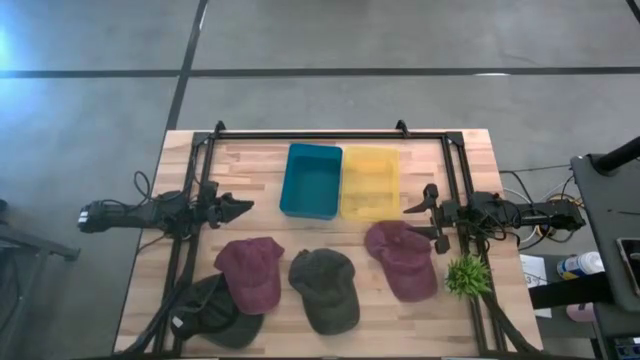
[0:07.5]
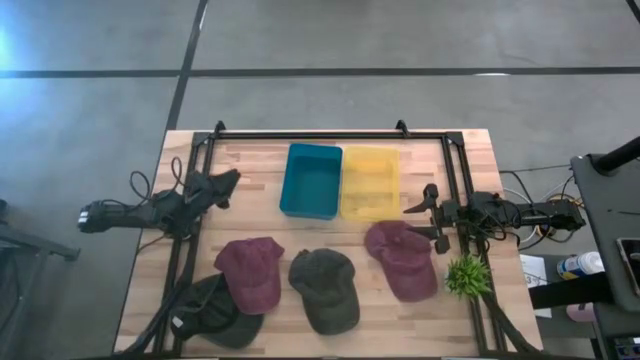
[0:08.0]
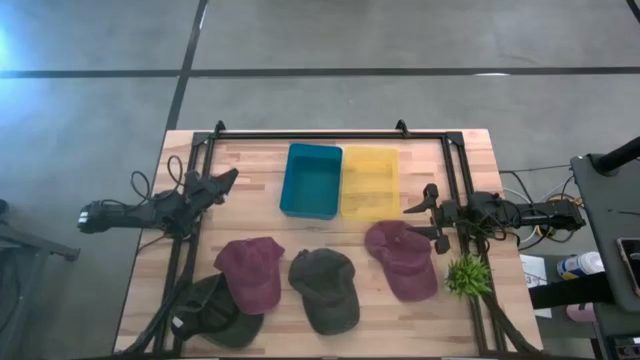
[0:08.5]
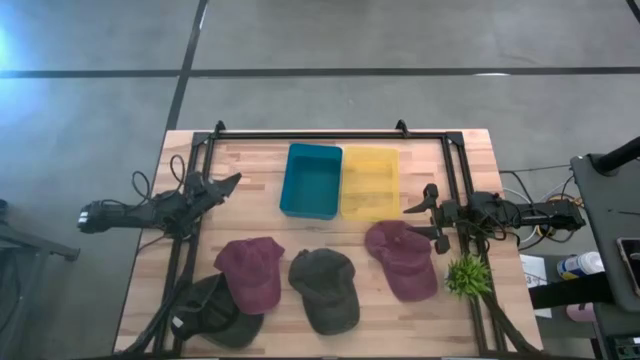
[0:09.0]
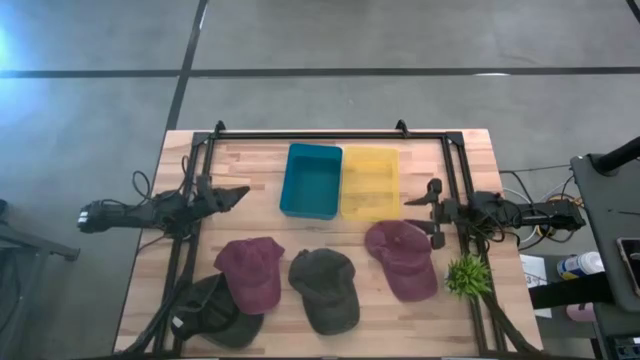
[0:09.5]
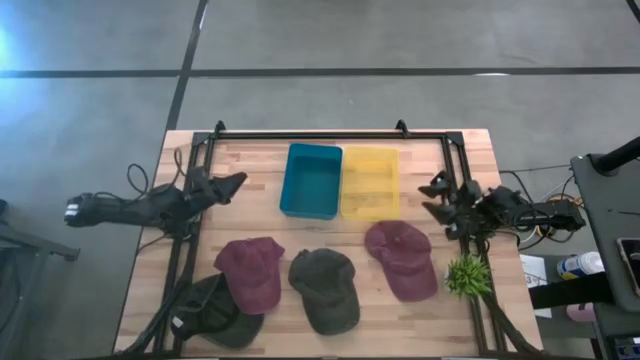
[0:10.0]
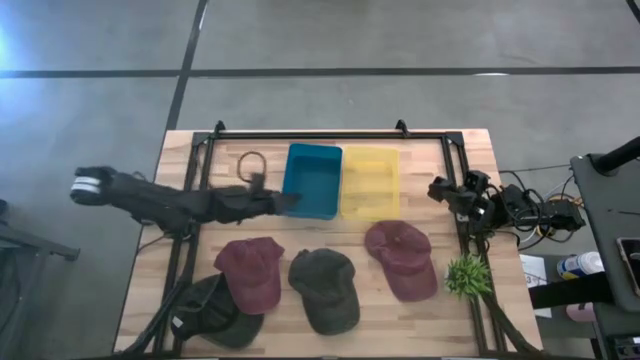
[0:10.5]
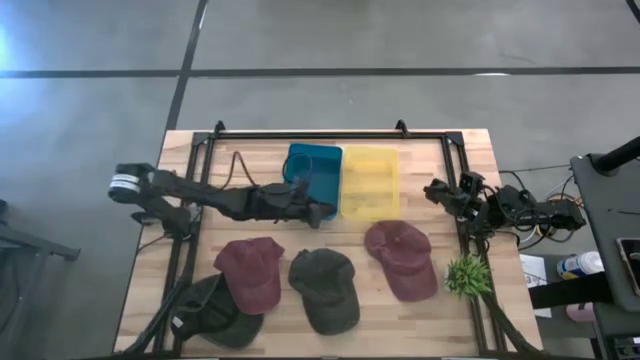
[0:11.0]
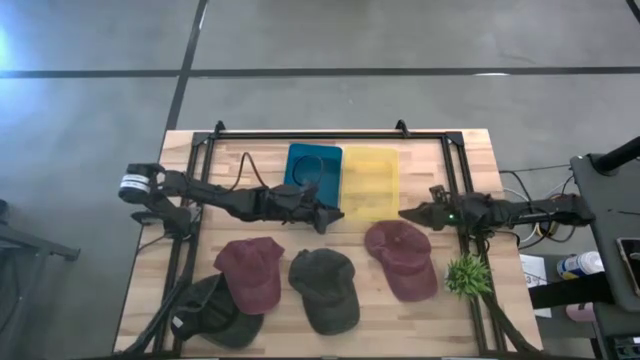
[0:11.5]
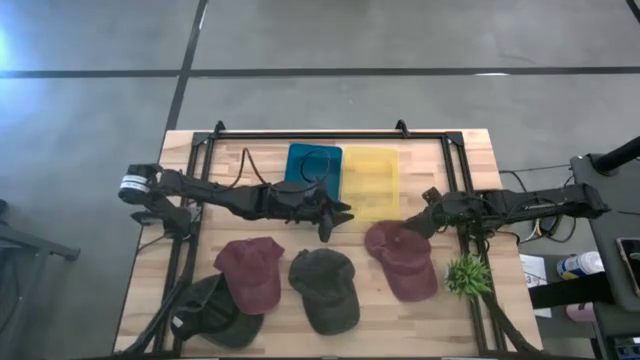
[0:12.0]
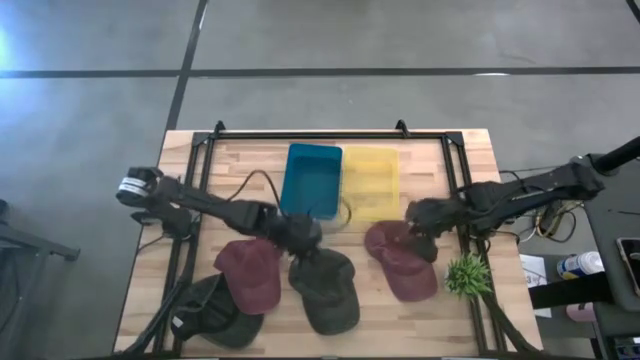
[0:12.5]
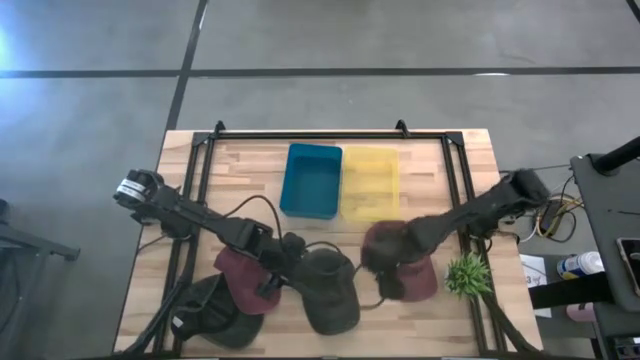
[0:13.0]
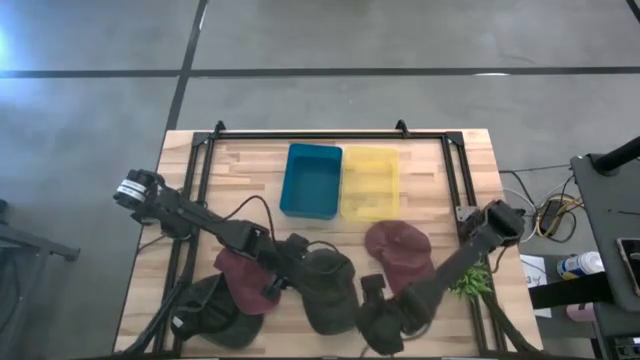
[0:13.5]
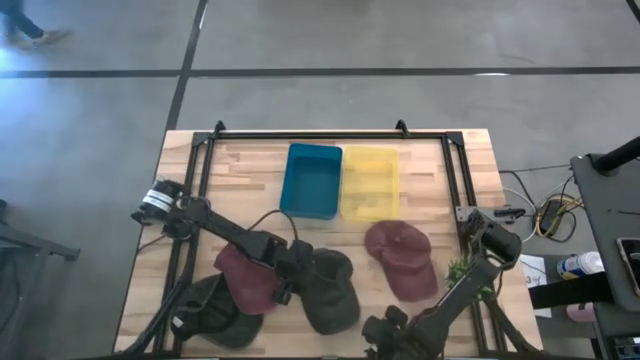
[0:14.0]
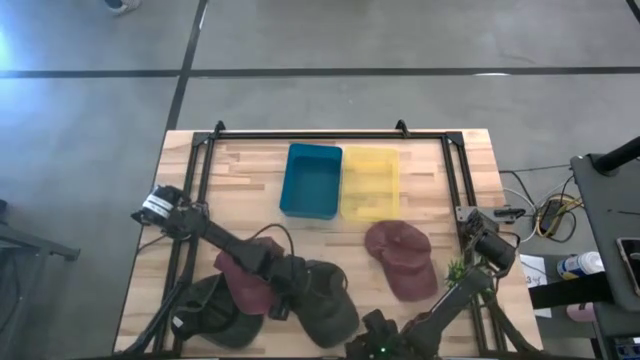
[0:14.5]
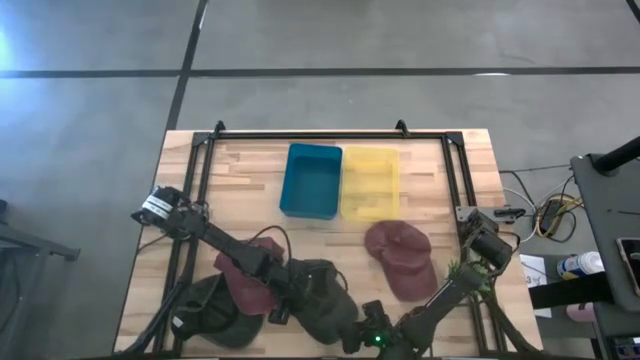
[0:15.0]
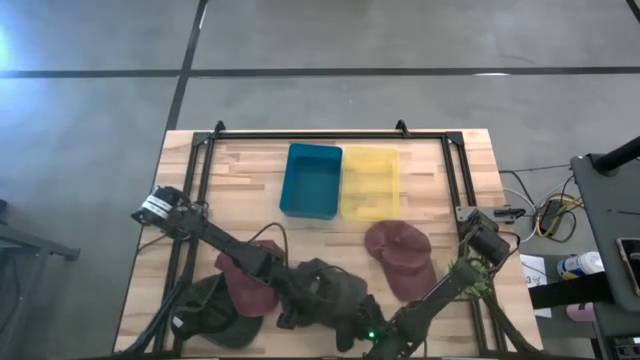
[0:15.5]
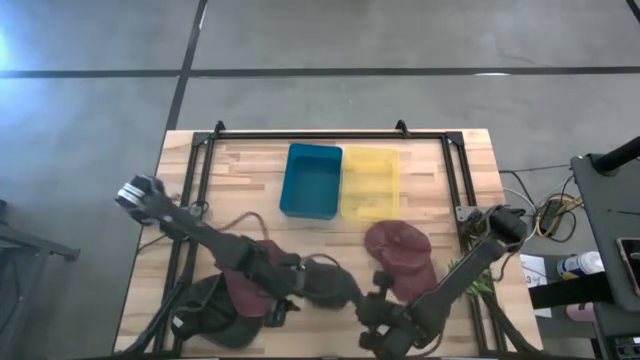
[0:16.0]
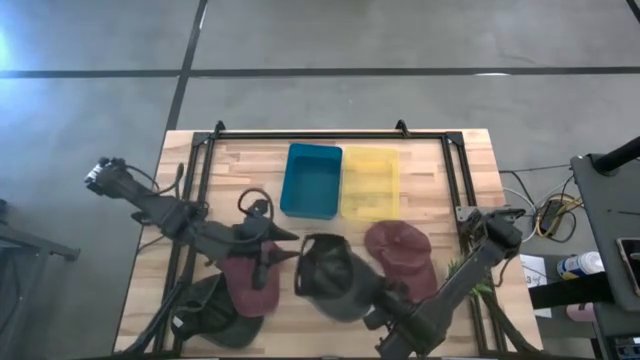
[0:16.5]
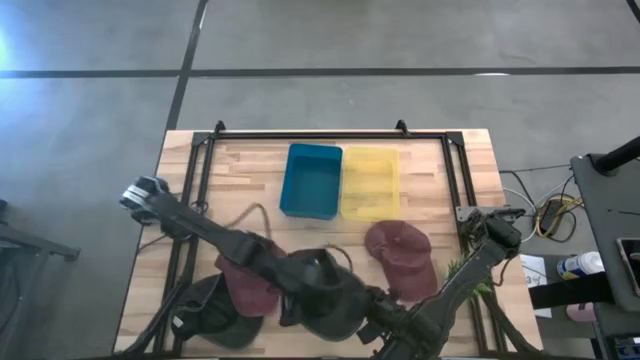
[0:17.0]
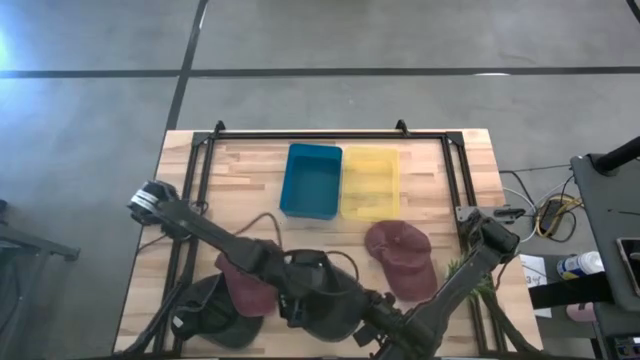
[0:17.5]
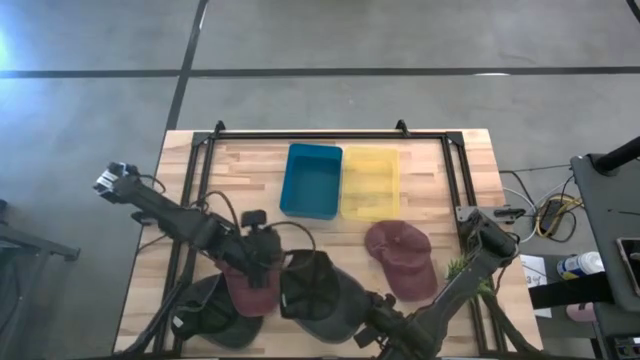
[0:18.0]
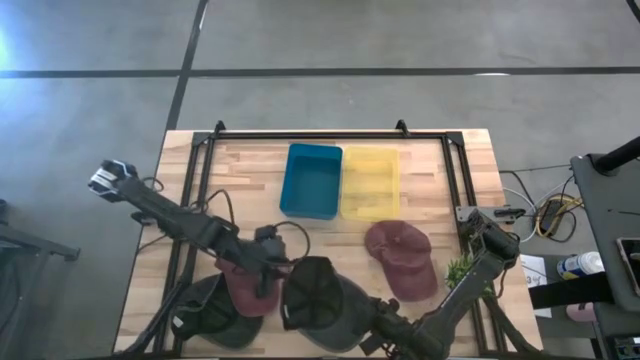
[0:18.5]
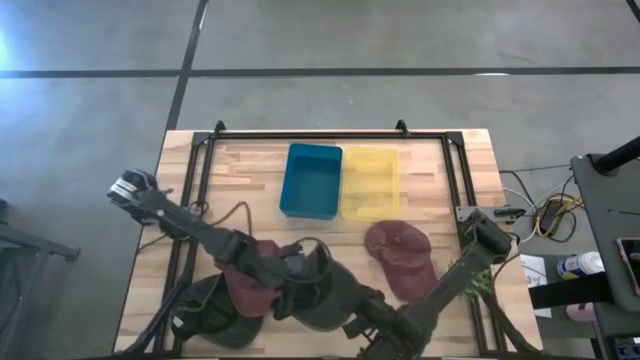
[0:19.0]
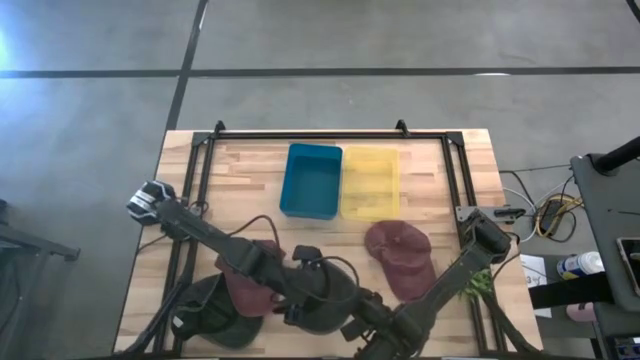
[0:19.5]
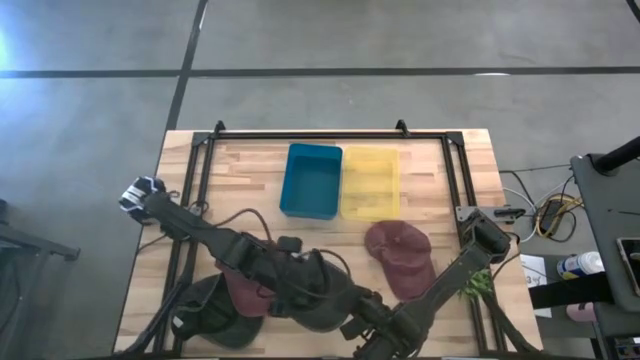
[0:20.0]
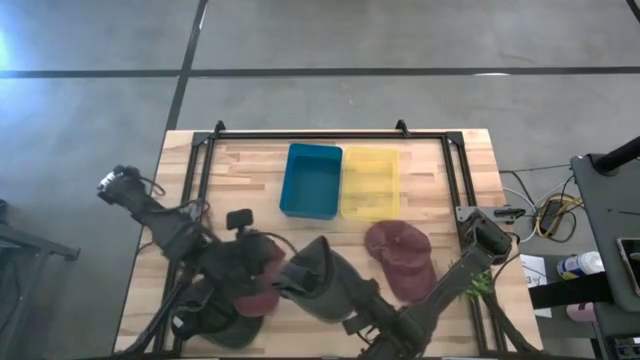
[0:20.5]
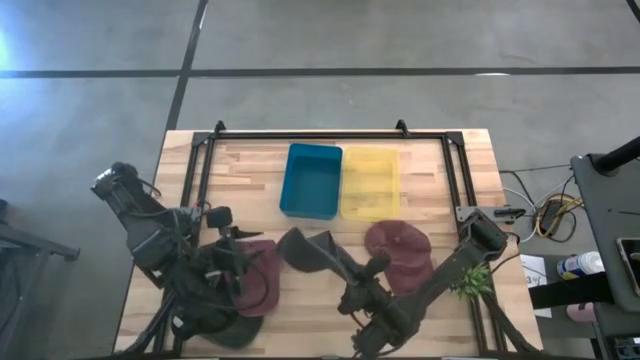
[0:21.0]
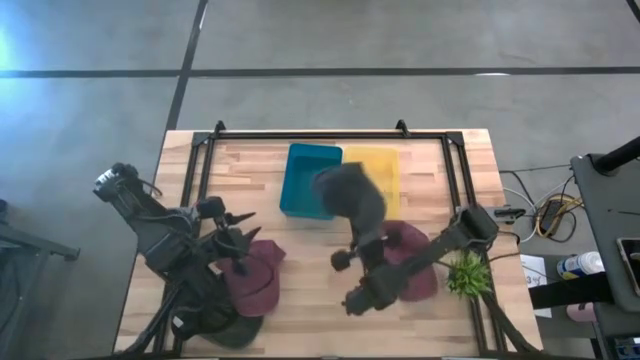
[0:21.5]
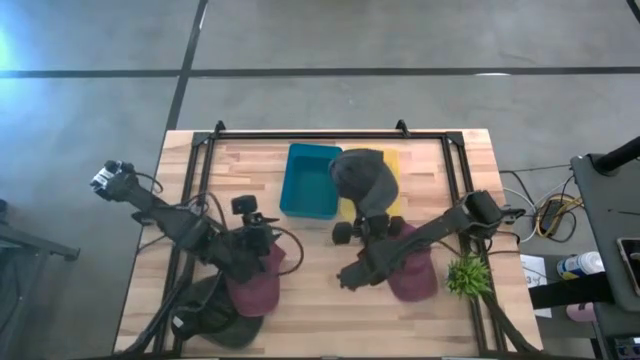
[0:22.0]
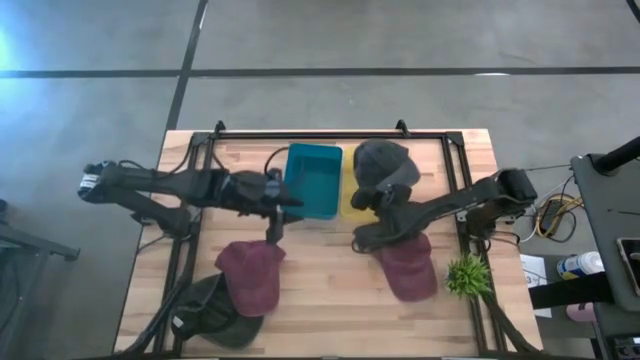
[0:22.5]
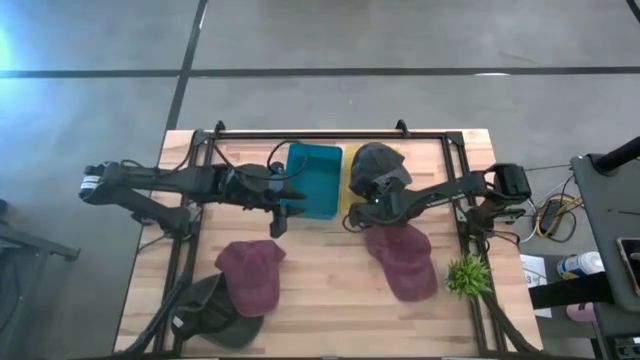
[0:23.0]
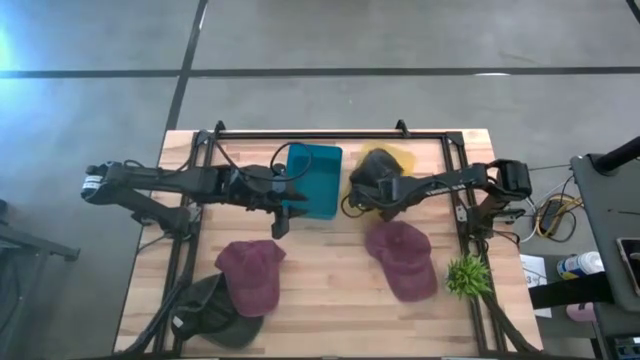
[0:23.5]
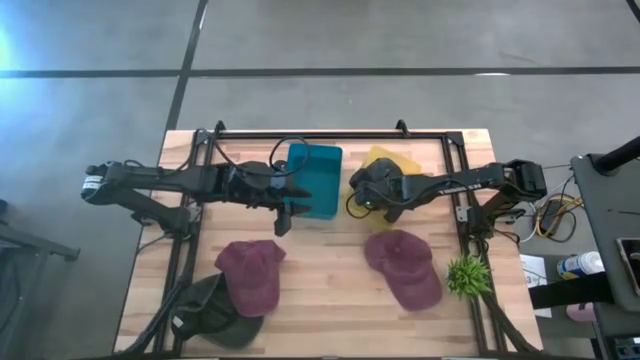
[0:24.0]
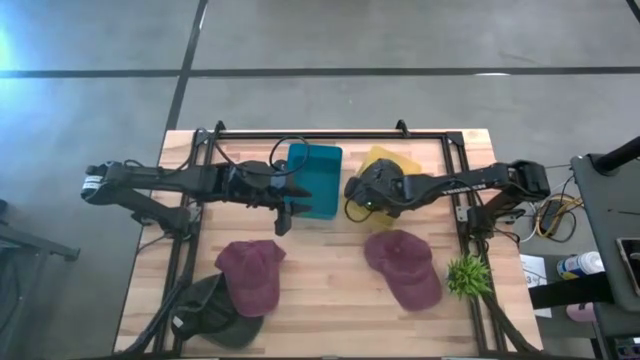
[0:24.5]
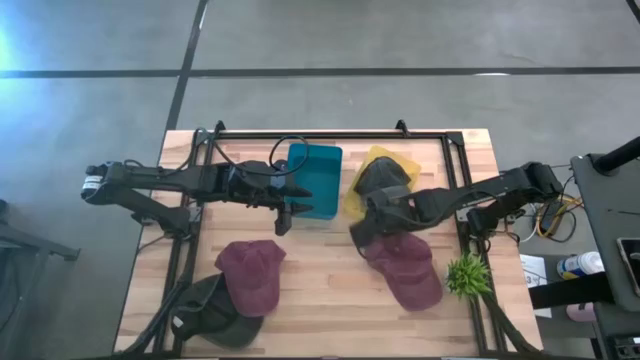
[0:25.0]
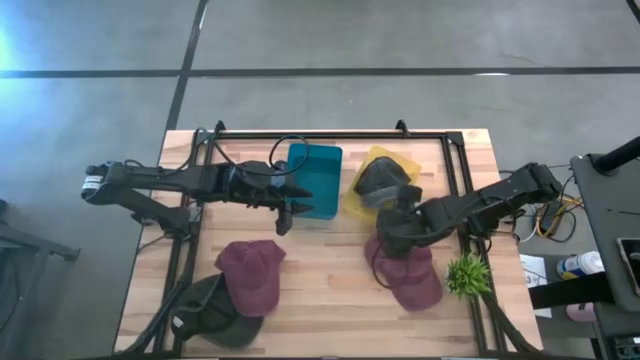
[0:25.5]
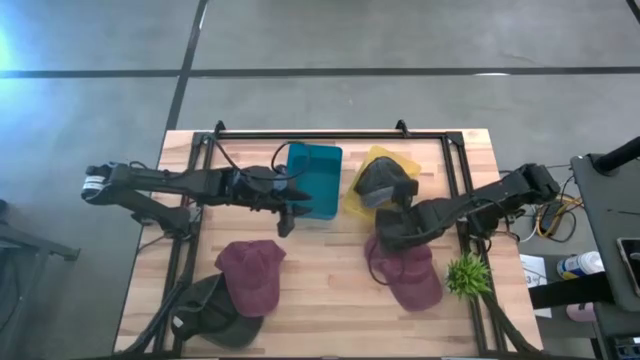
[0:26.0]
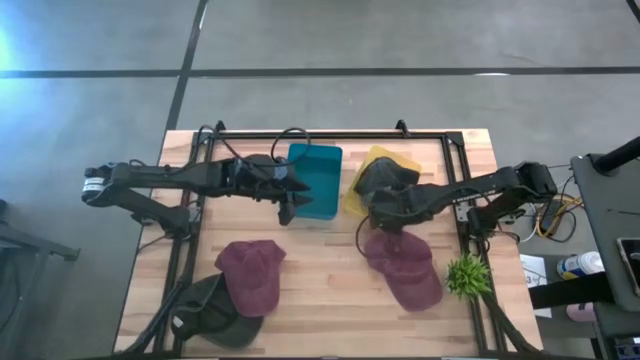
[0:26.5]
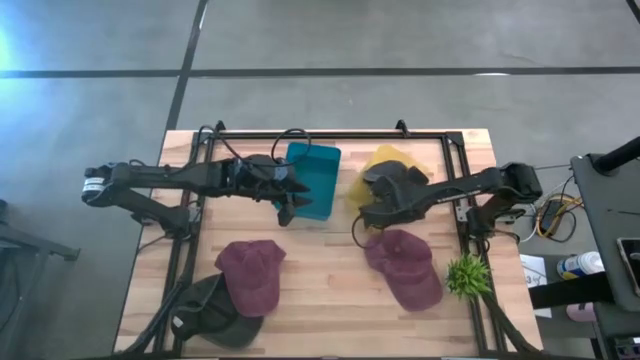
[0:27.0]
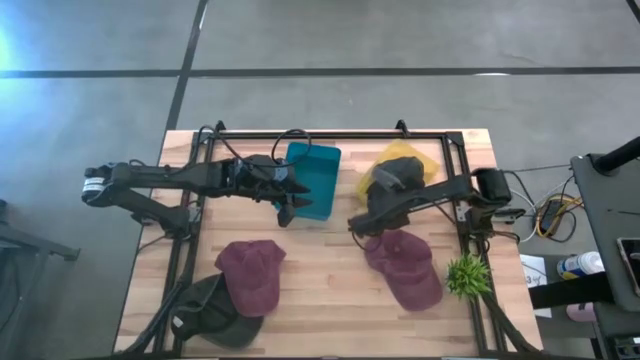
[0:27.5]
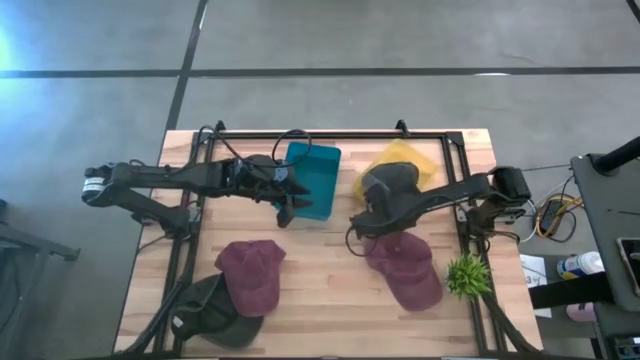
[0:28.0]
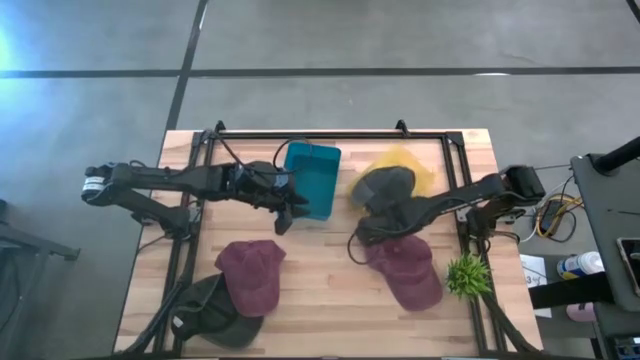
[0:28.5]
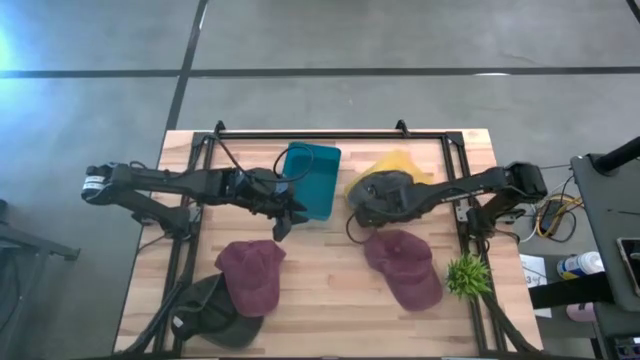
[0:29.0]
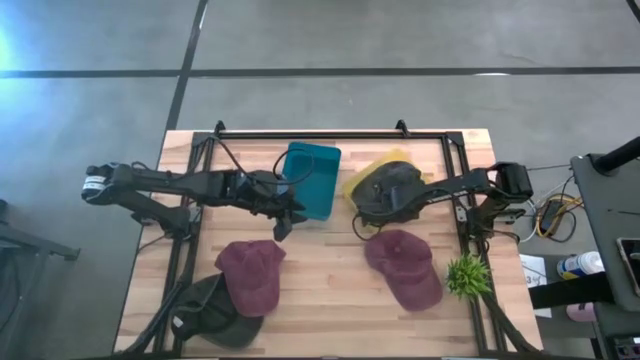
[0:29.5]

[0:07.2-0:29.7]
Task: Pick & Place hat
Put the right black cap into the yellow bin
